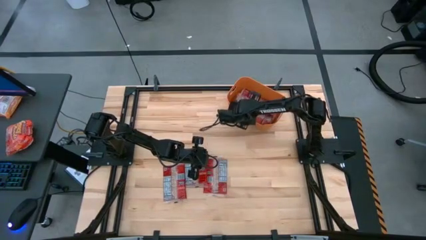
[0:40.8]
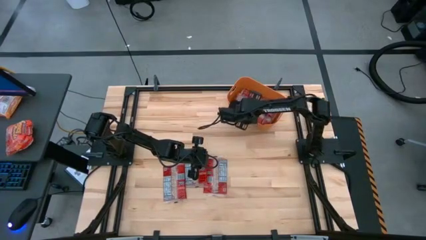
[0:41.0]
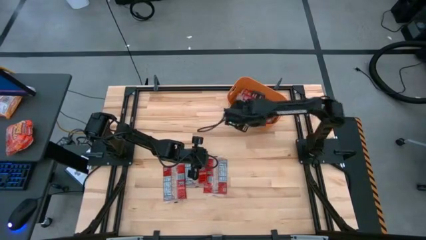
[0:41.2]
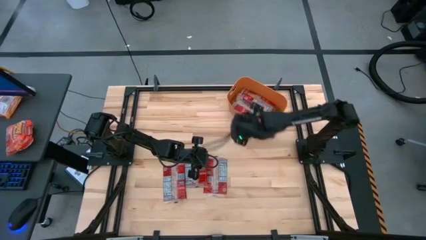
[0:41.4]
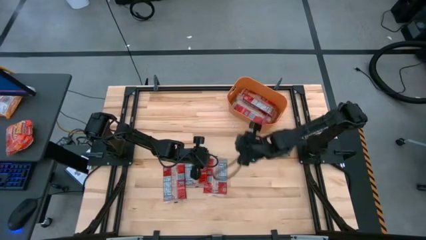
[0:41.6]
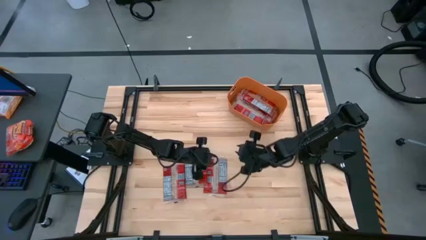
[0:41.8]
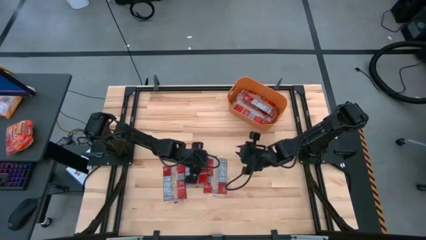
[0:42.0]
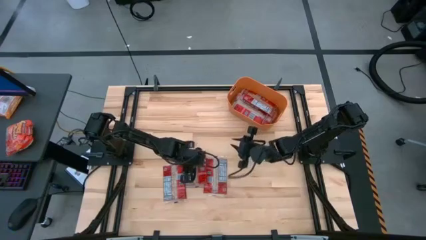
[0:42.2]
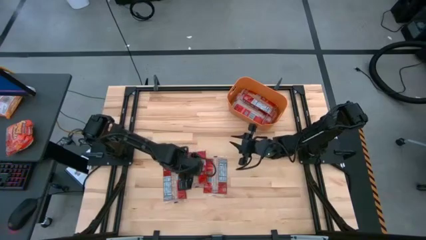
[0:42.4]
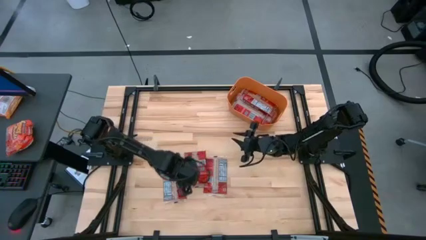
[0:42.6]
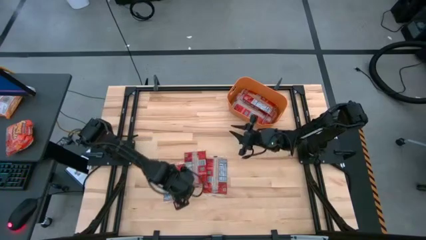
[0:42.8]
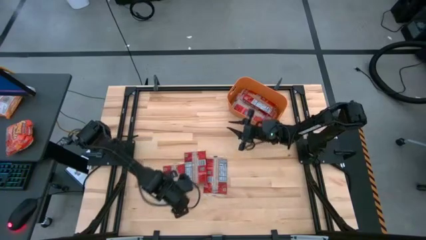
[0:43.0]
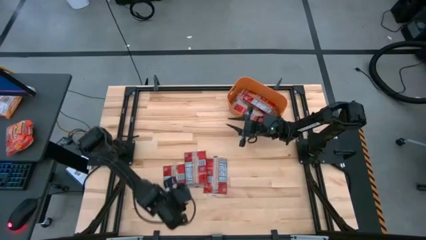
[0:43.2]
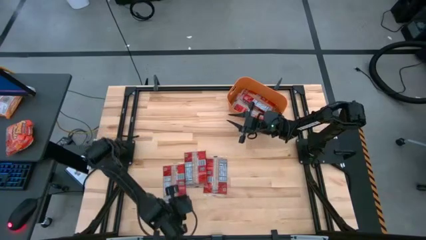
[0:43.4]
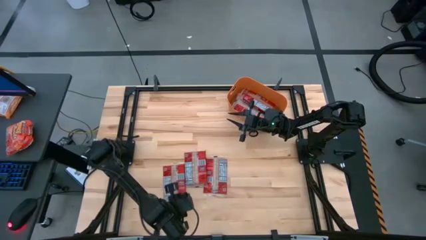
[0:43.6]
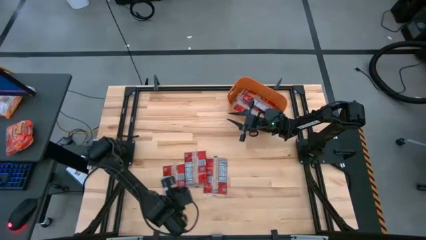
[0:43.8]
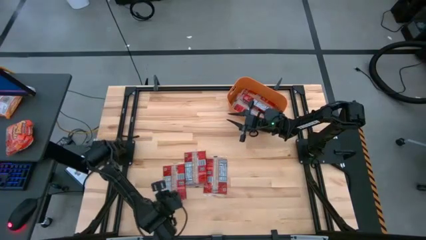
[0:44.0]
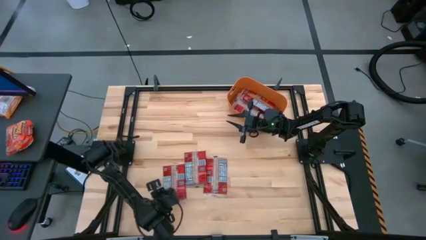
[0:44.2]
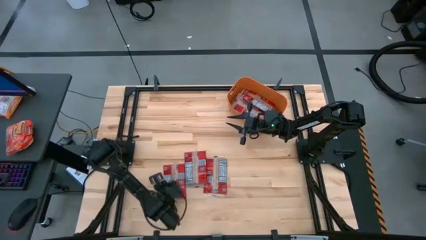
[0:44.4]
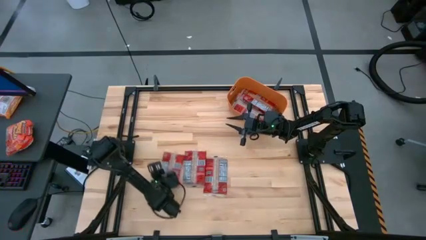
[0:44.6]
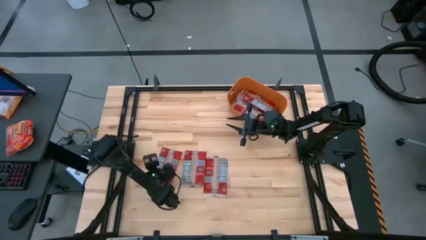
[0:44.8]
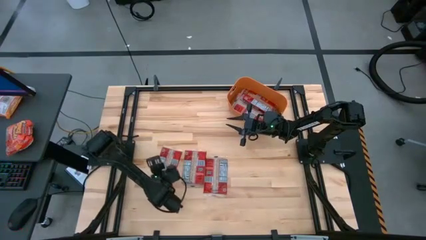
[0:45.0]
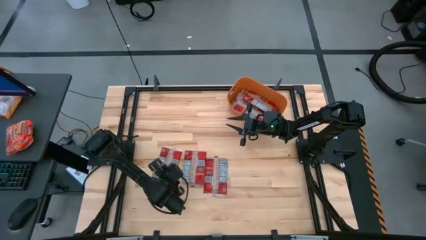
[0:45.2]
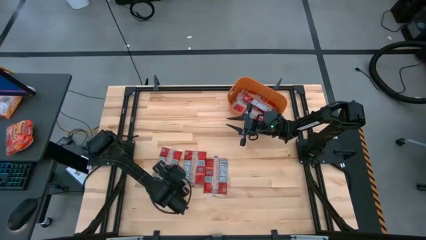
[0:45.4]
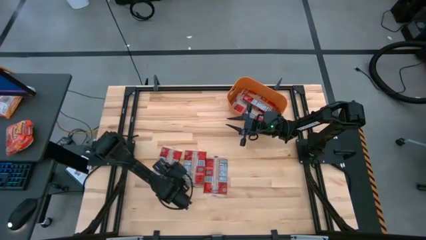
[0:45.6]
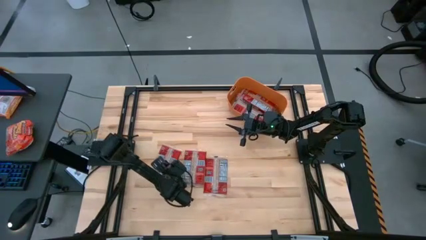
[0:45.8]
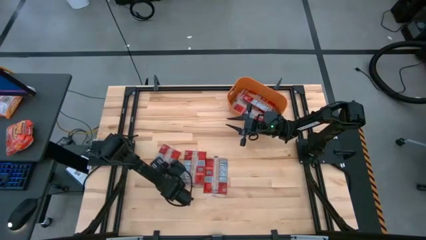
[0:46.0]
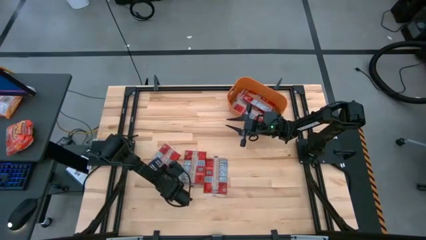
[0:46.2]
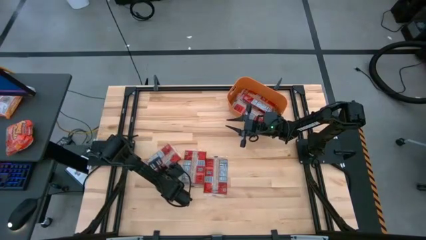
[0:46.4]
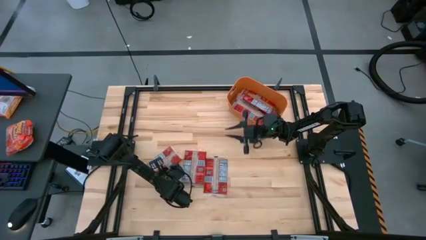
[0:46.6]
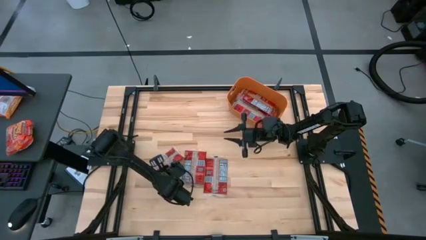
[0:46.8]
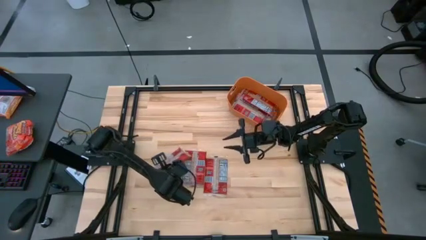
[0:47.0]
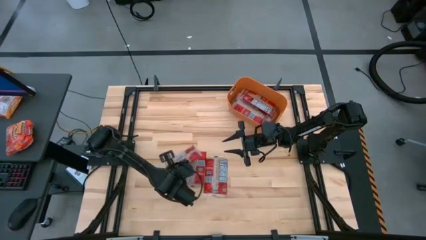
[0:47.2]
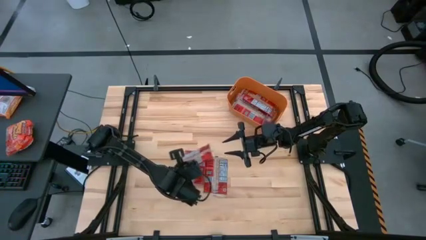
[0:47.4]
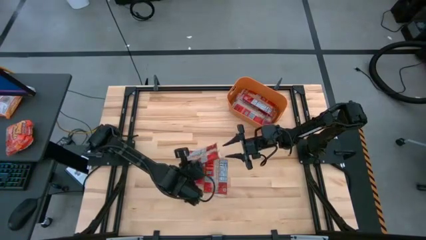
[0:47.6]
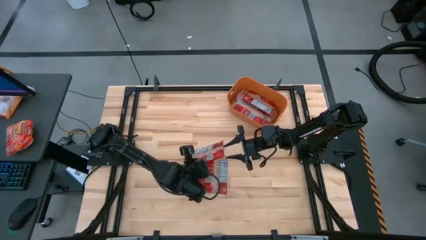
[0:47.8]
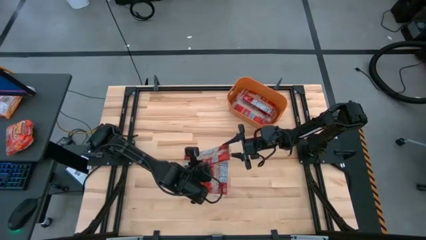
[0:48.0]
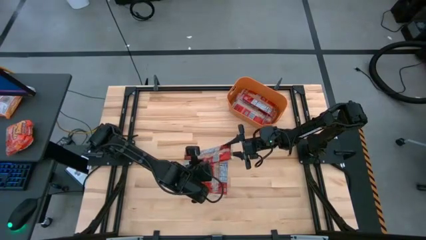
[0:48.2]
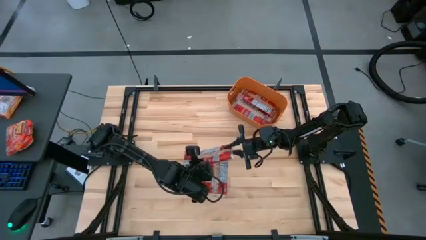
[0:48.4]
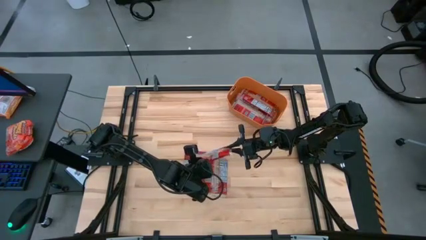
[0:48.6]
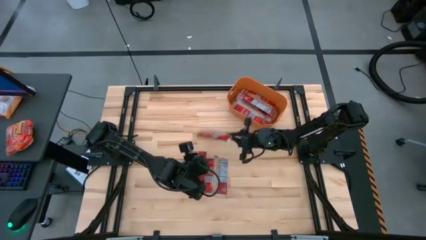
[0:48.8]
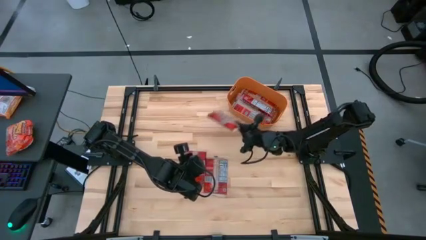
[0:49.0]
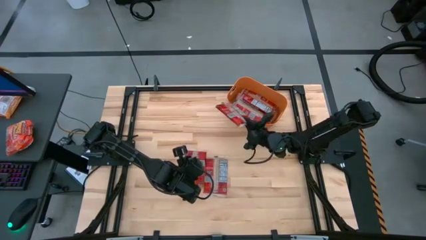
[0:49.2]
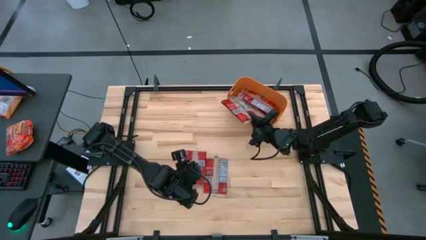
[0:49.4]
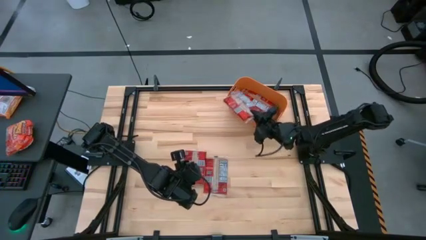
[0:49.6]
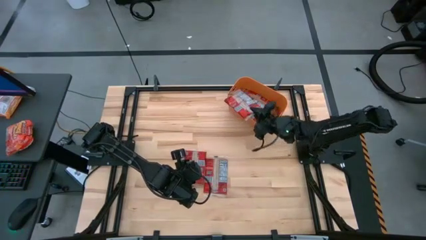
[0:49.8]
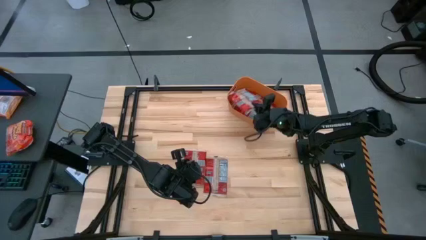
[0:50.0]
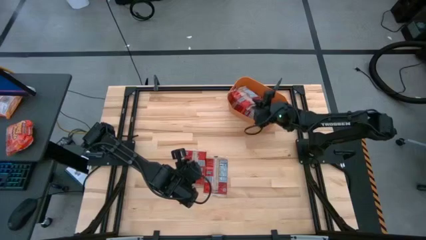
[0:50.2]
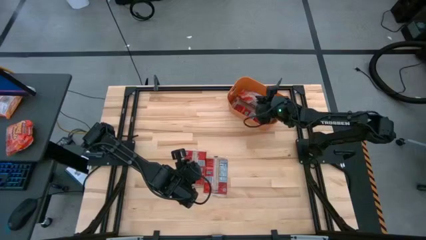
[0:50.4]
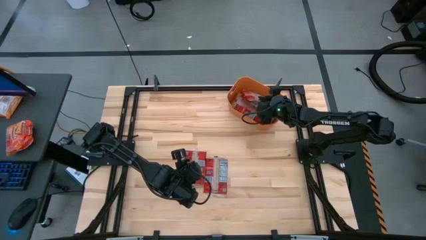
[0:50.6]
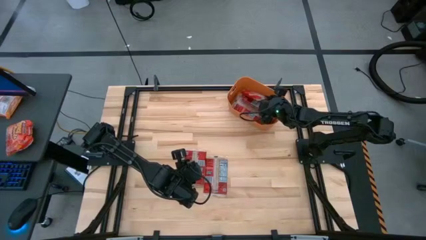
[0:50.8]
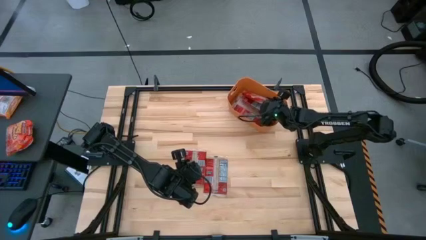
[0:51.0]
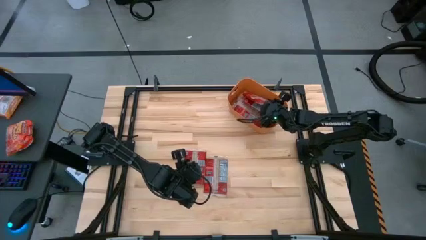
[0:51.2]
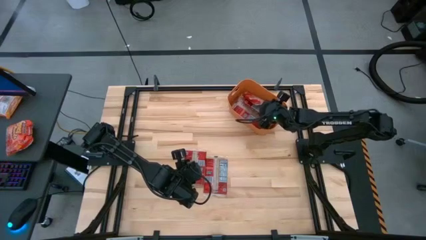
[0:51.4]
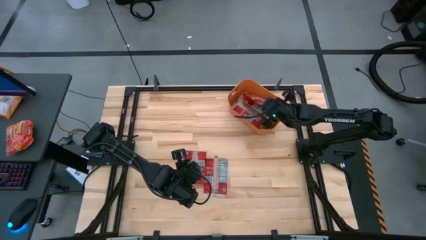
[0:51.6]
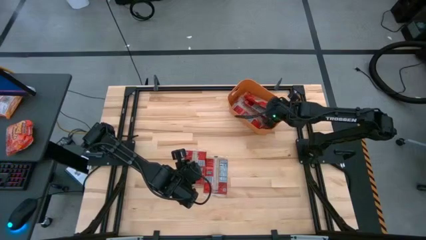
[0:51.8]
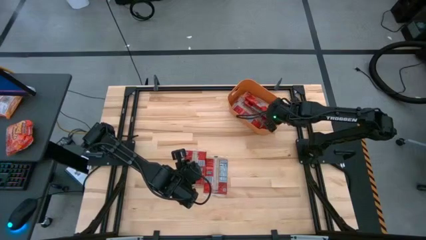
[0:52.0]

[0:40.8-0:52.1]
Task: Sort popcorn bags into baskets
Put the red popcorn bag into the orange bin

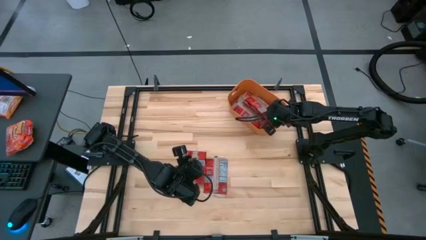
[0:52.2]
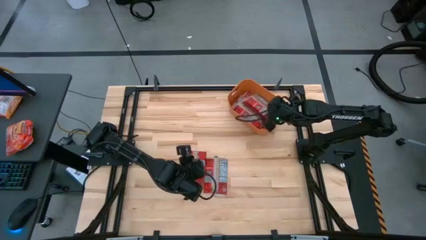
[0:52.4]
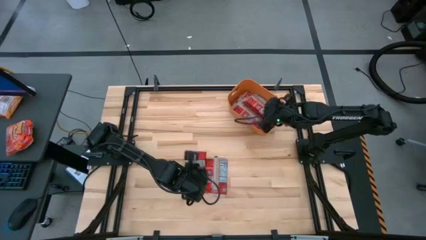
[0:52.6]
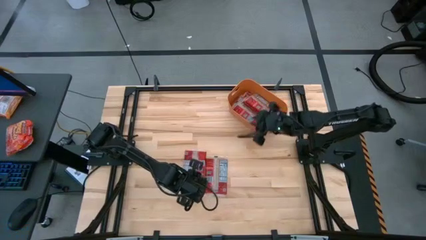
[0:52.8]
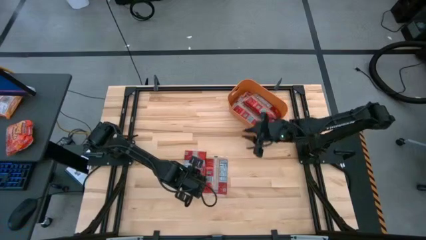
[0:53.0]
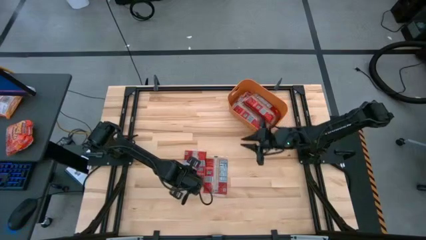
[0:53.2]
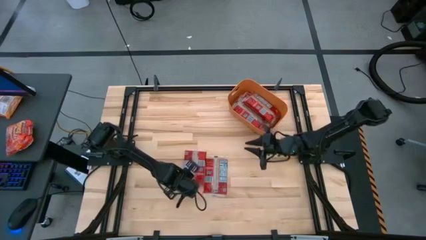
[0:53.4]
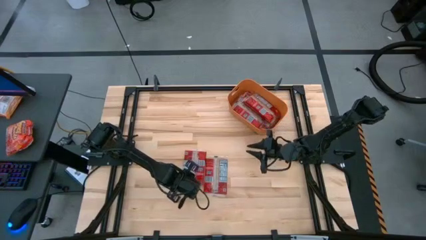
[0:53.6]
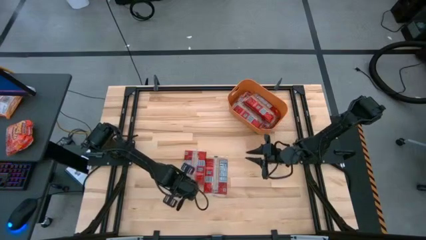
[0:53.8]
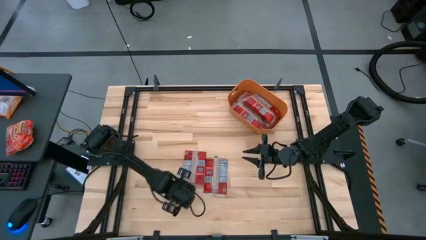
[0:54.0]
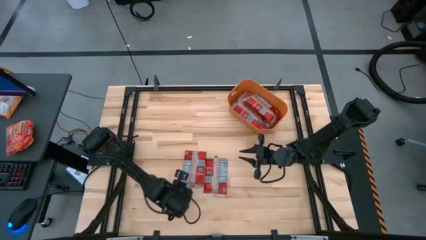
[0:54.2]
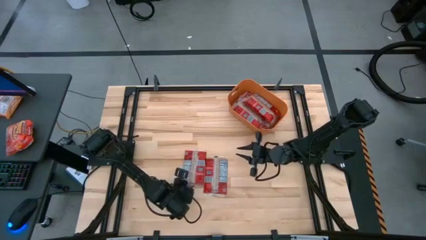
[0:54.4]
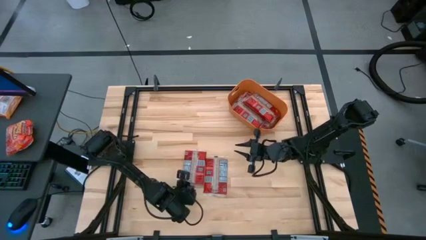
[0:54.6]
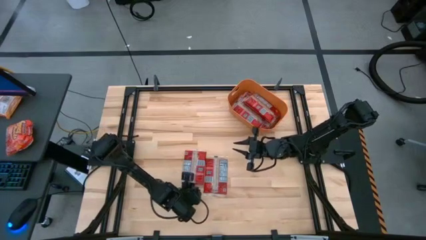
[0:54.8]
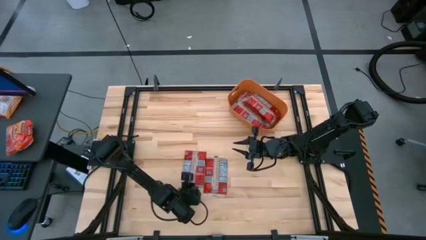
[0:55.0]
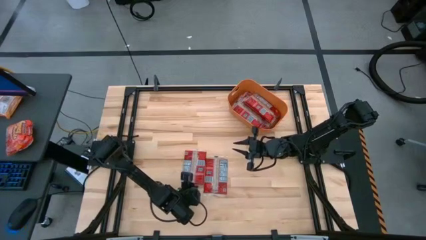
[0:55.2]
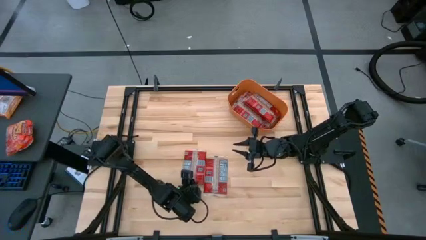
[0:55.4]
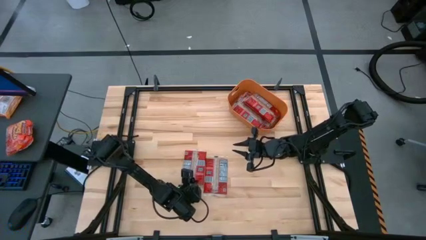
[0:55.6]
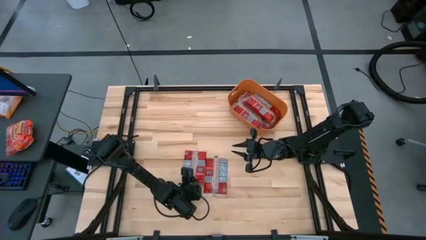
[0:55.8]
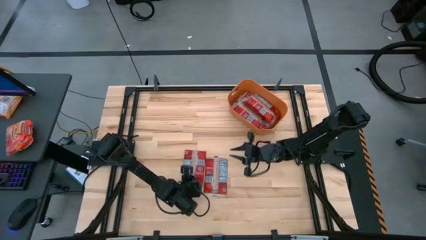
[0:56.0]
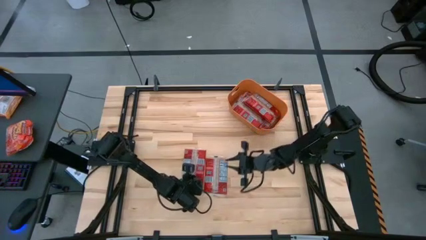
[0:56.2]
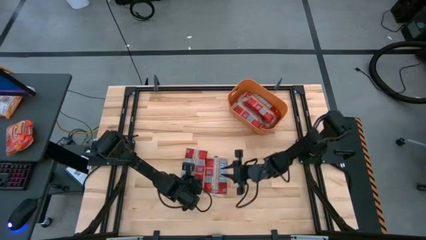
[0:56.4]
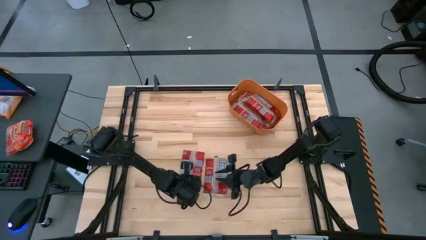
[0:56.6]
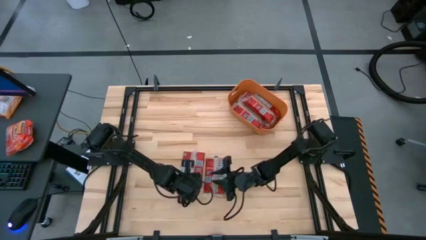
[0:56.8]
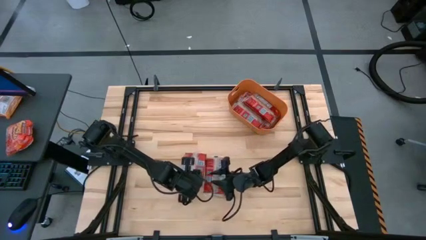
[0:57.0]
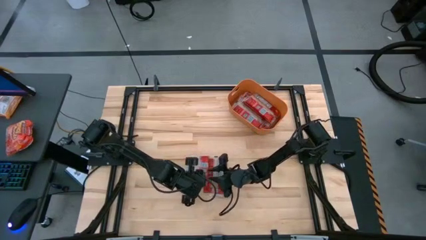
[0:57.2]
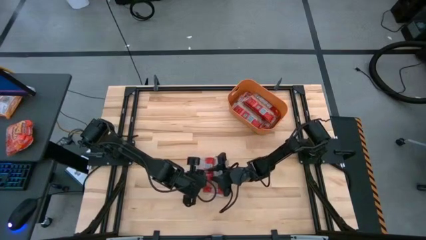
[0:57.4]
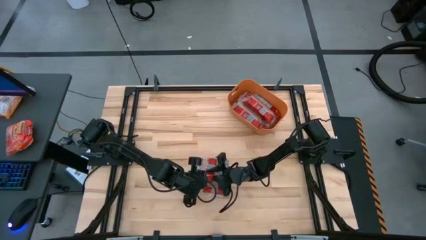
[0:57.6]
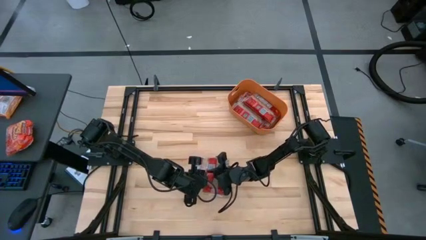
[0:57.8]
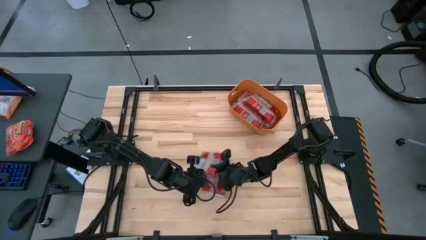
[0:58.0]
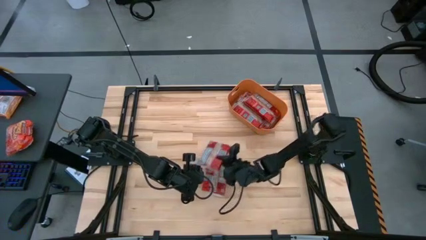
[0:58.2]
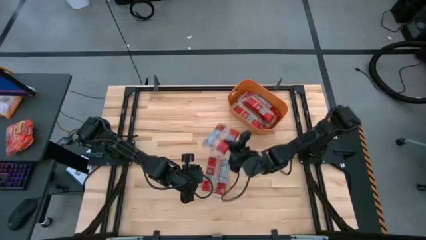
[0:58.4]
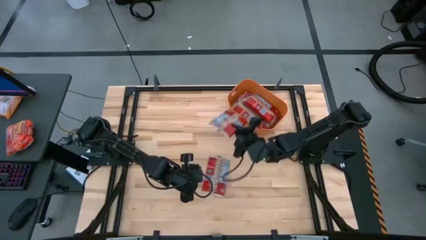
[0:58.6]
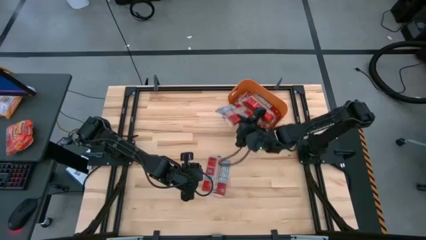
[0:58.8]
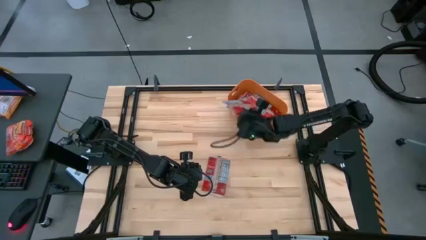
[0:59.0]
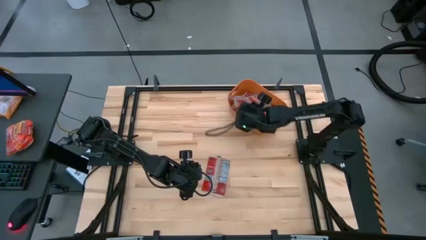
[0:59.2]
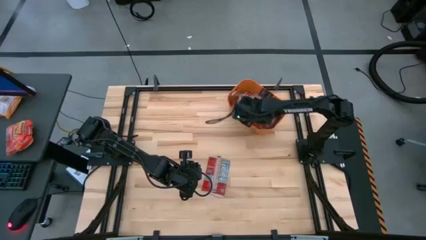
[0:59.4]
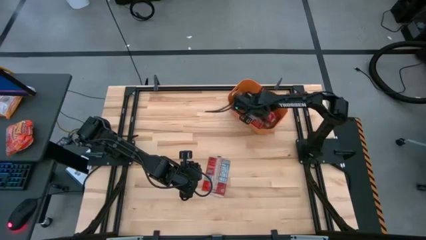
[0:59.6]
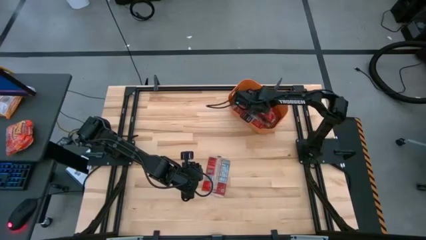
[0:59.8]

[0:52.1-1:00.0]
Put the red popcorn bag into the orange bin
